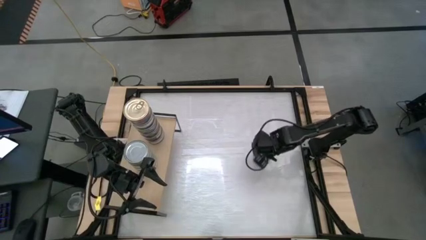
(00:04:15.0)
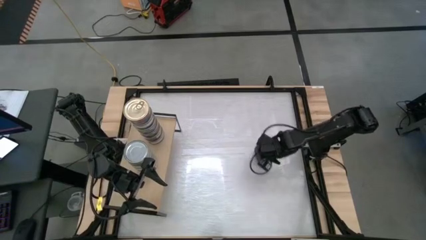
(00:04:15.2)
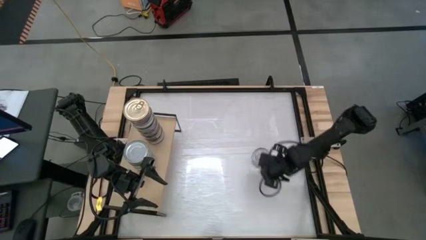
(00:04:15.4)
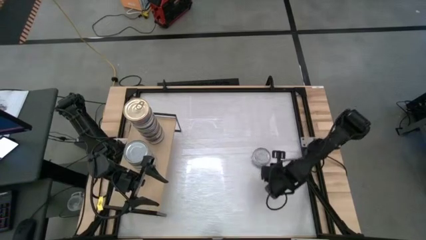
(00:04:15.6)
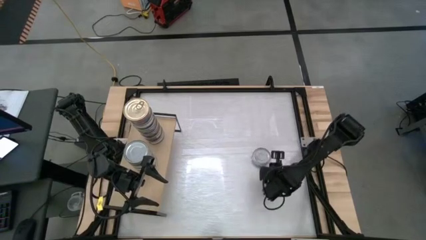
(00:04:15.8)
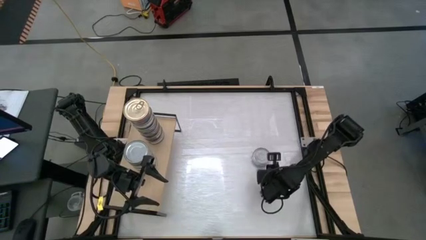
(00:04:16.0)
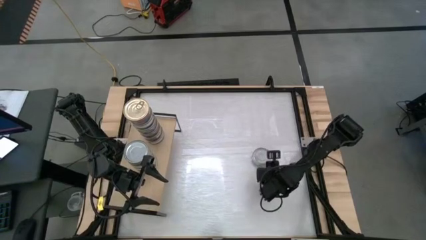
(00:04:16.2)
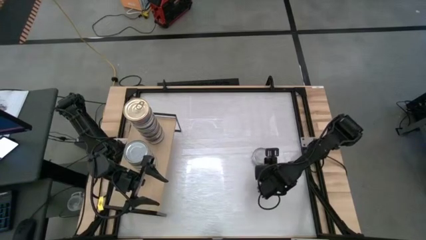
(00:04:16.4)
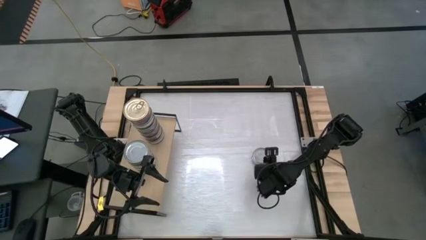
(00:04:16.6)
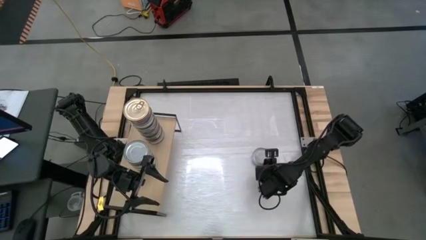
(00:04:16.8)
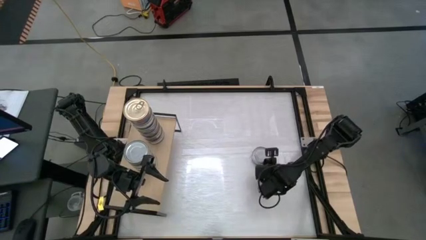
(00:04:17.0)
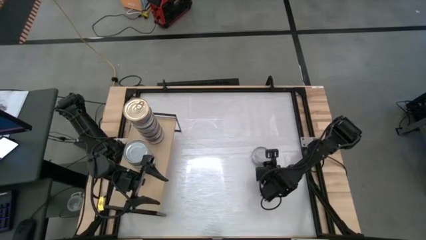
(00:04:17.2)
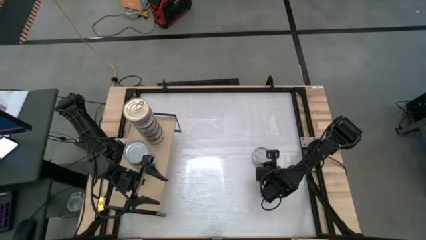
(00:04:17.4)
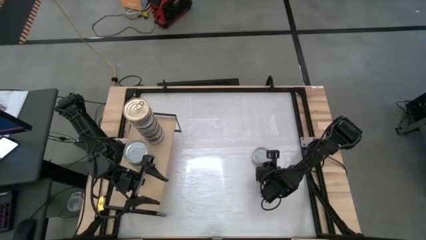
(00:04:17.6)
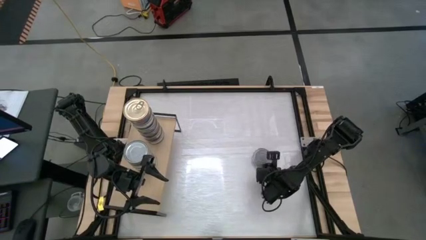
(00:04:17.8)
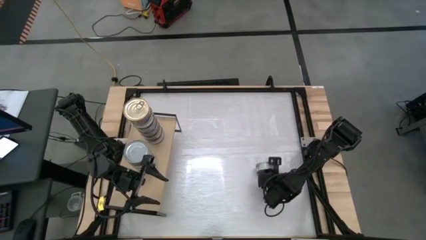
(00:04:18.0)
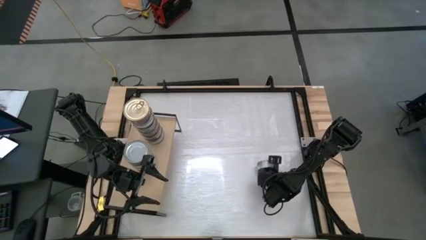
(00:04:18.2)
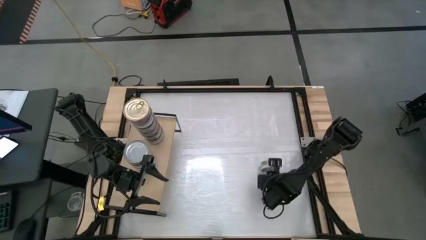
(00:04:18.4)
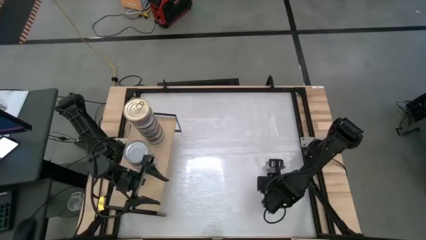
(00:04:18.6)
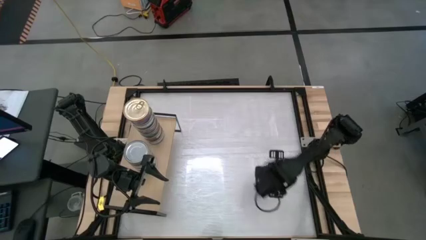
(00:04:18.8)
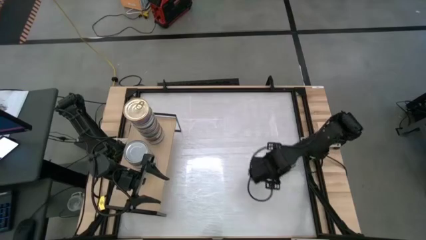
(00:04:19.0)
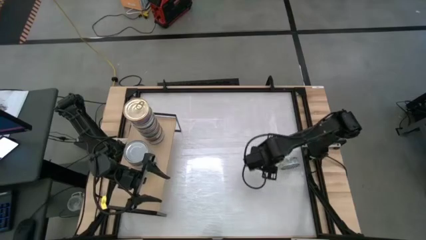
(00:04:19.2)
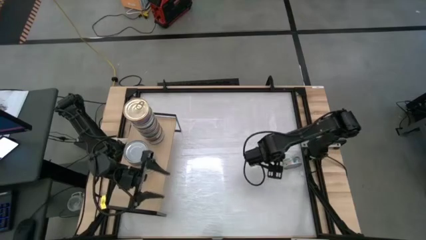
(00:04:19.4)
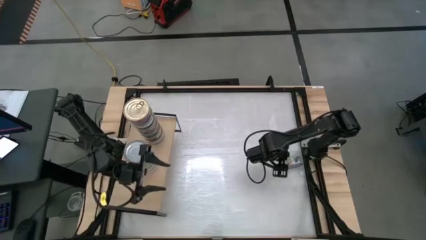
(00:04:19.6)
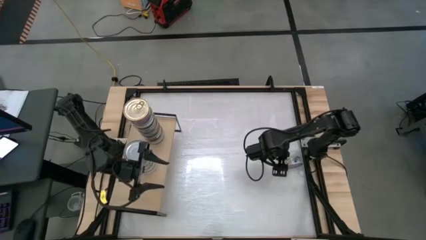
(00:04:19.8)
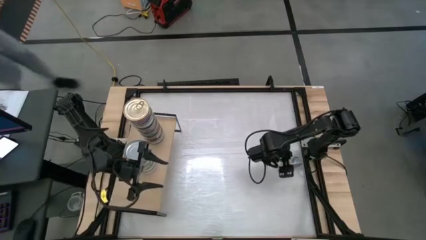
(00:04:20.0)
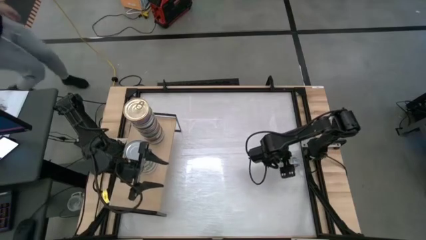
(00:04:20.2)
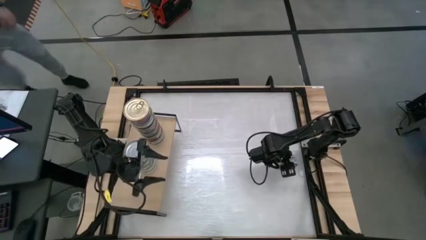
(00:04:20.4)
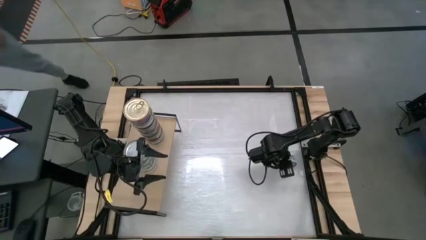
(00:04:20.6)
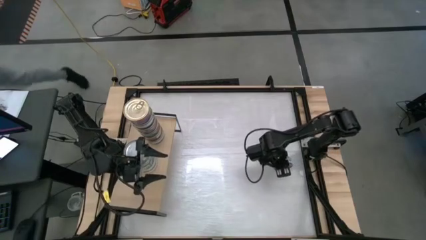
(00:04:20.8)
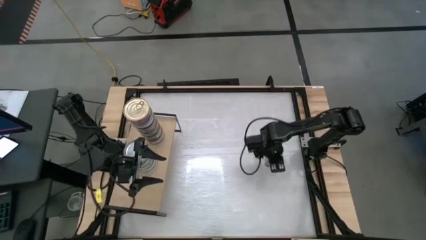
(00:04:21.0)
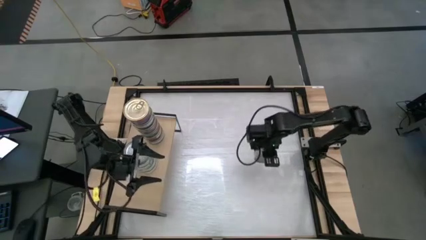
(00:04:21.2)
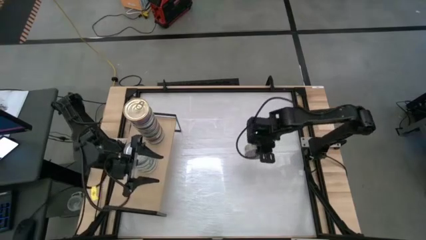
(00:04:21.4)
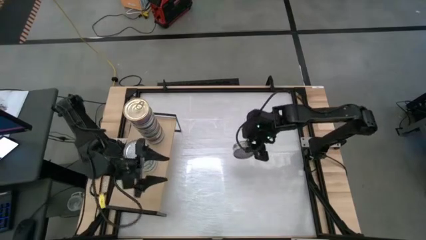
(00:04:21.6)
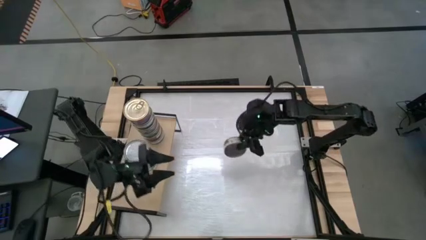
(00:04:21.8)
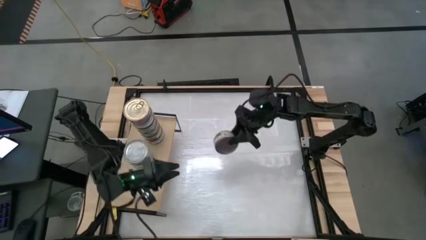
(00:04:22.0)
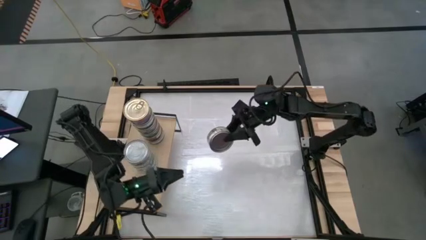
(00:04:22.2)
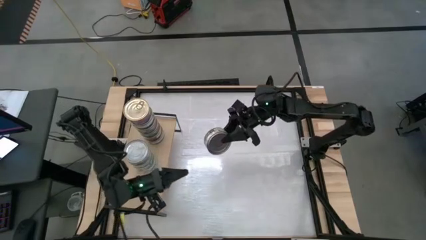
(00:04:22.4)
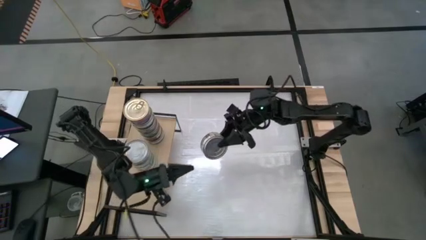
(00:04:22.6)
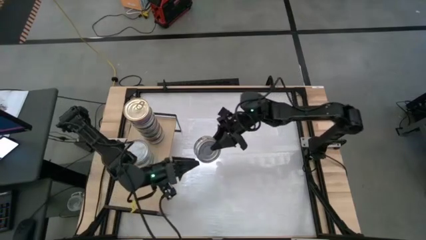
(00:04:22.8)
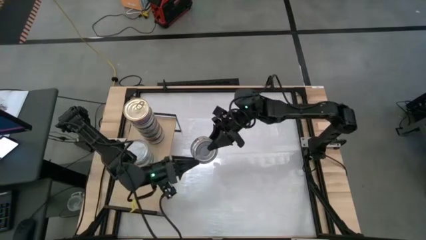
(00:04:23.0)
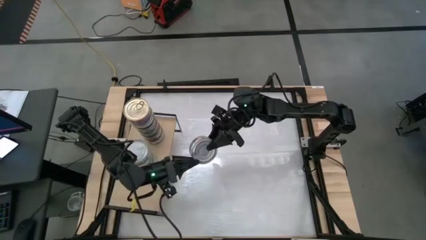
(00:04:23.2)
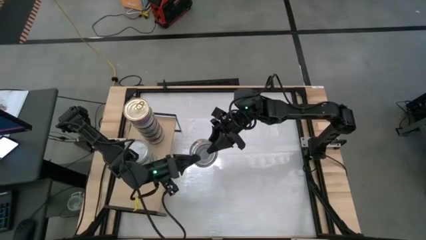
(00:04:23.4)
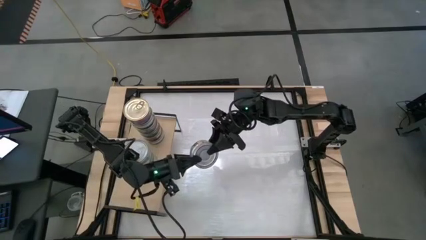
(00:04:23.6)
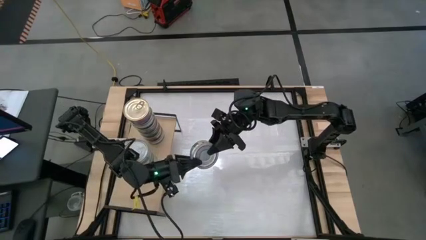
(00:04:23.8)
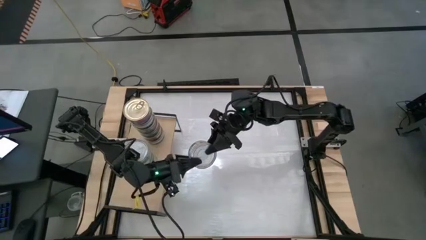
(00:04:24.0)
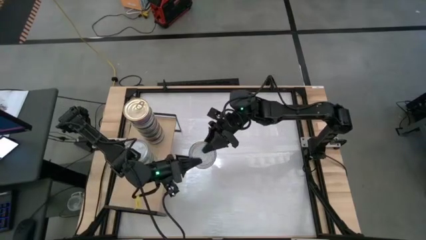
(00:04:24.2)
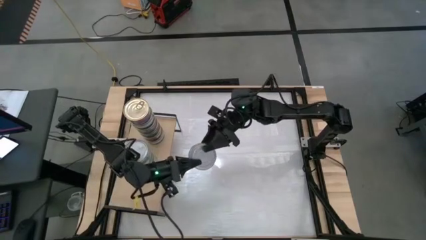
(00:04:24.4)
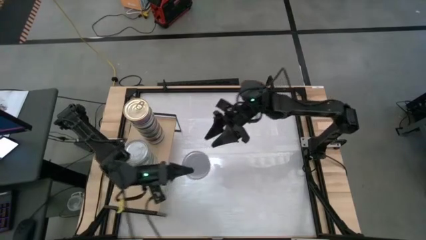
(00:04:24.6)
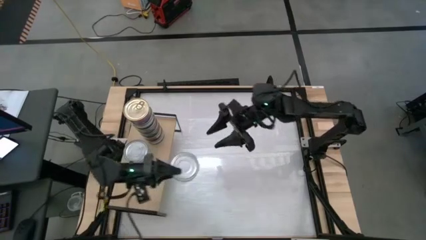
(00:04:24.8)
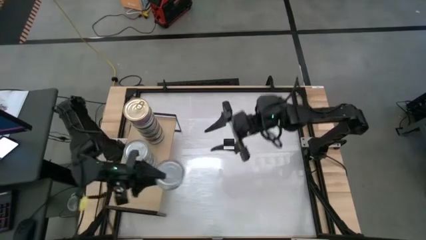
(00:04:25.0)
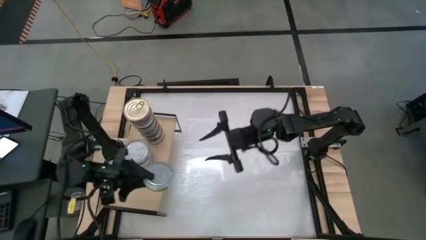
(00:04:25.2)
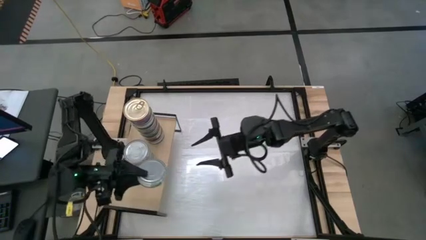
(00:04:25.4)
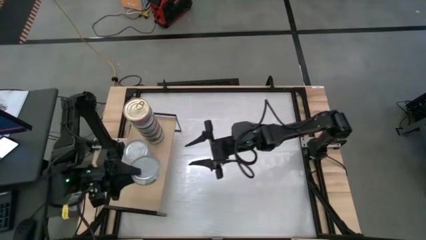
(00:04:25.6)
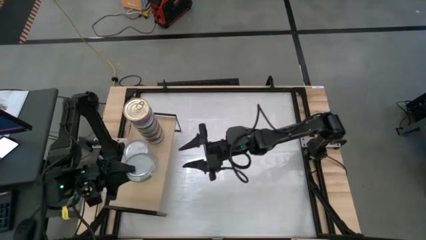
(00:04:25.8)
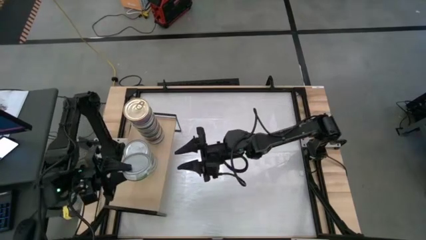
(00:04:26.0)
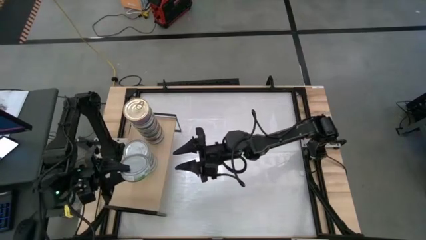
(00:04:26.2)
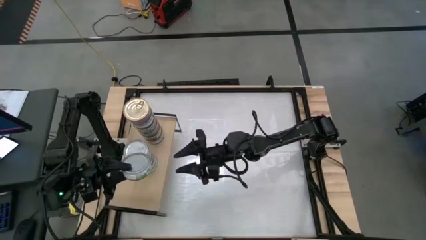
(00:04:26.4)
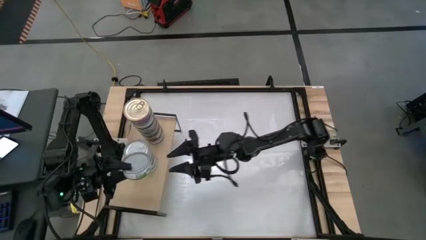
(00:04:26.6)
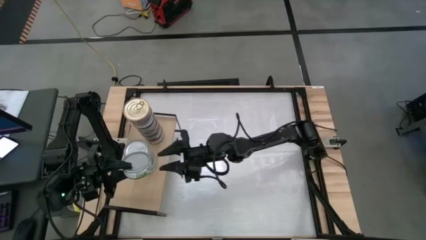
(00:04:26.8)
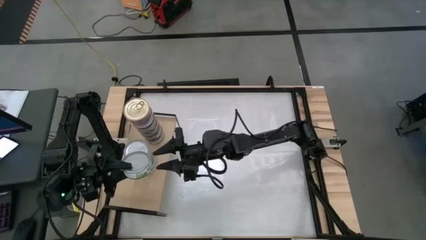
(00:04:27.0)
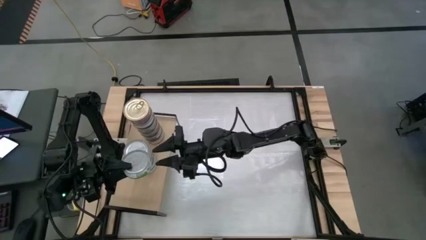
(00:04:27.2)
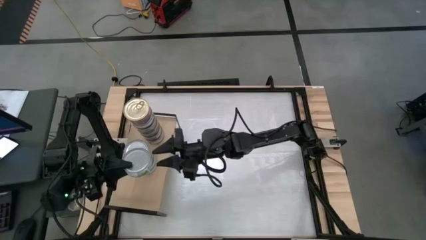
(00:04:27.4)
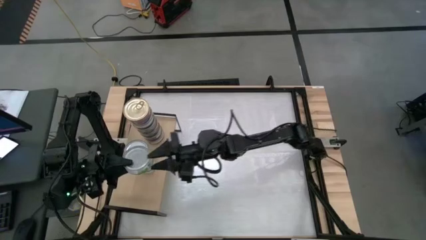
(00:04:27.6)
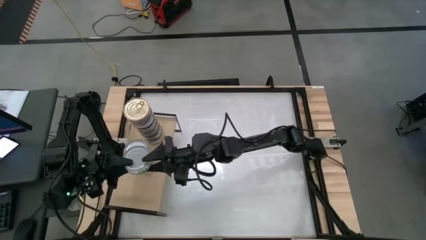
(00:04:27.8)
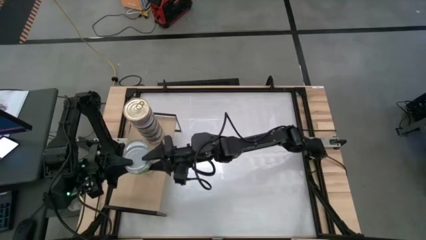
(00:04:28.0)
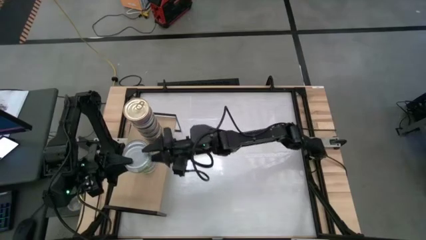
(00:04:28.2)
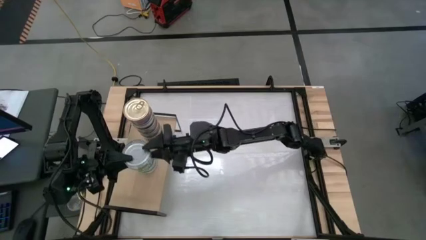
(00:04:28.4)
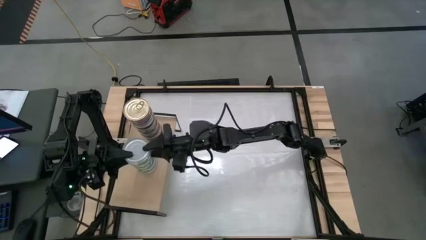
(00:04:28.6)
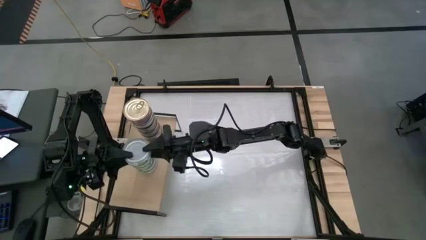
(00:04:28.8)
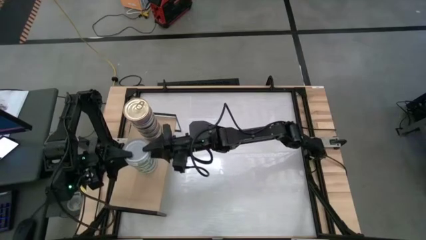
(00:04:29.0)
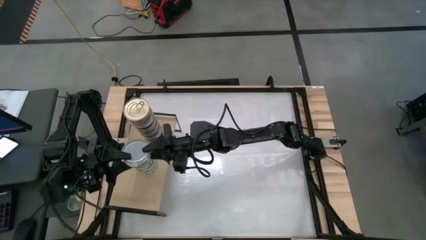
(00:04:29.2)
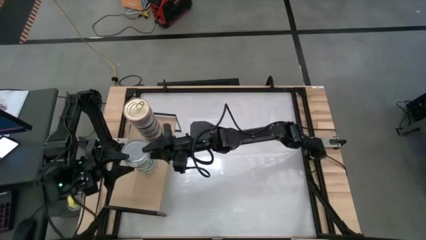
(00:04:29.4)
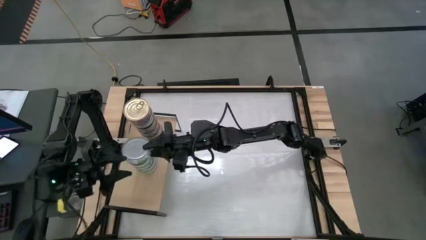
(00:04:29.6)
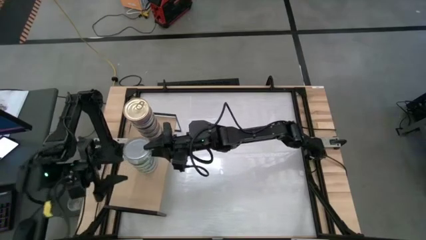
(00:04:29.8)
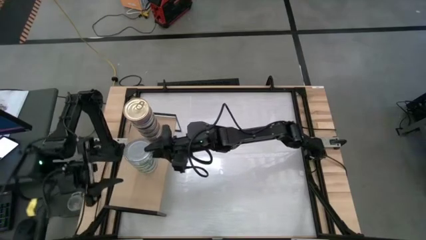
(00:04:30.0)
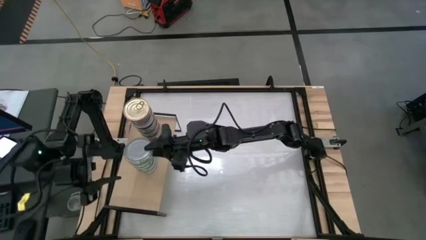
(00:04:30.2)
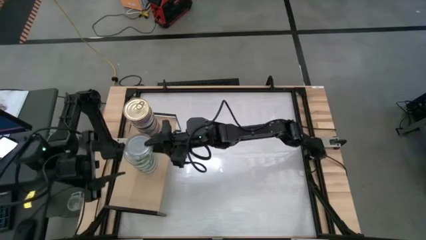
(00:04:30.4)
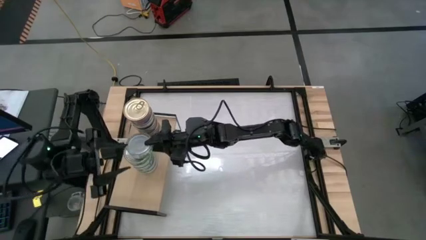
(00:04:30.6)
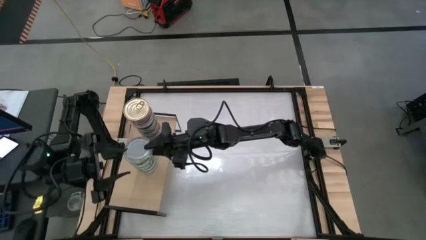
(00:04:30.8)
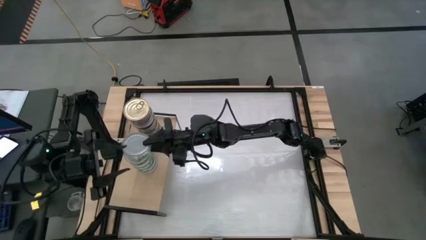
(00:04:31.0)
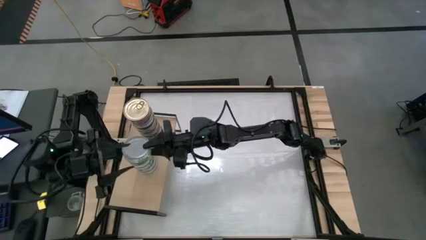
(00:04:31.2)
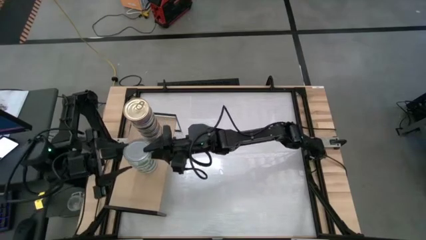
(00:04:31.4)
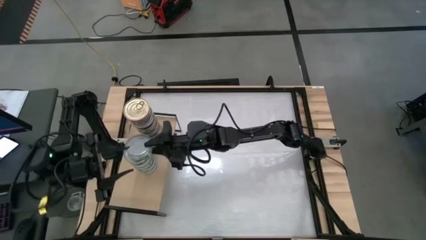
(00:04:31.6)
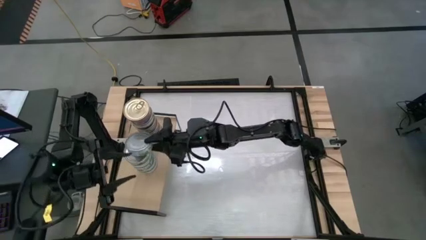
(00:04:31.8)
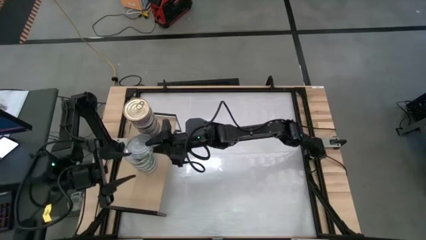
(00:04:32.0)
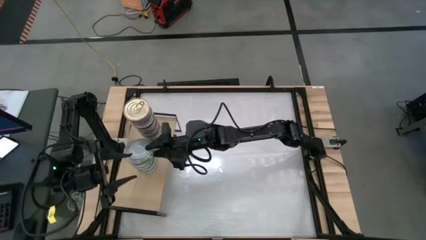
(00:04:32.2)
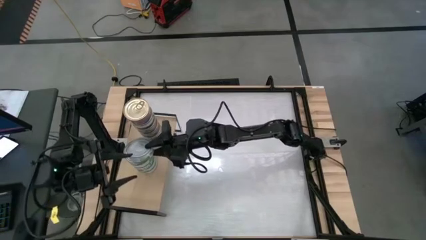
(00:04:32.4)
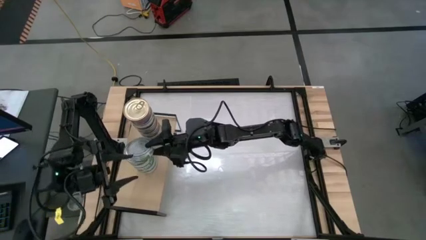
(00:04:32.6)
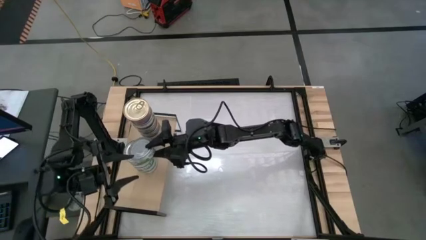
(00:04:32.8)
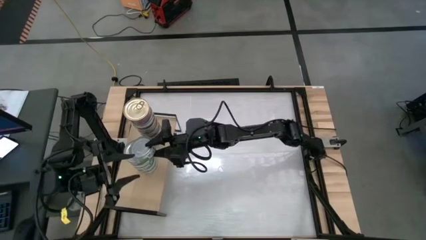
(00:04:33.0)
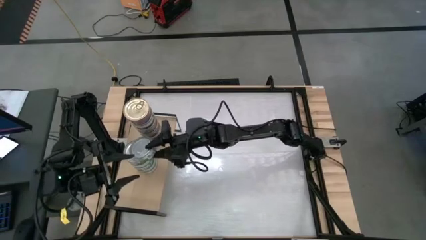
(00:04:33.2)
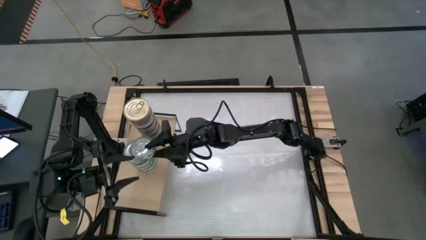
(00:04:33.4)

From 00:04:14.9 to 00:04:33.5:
Task: Stack canned seafood by type on shelf
Stack the green tuna can on top of the green tuna can on the shelf
